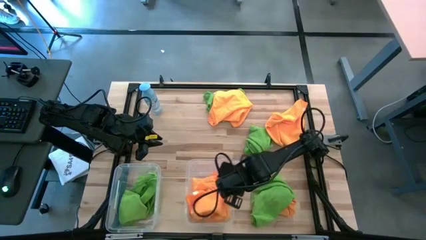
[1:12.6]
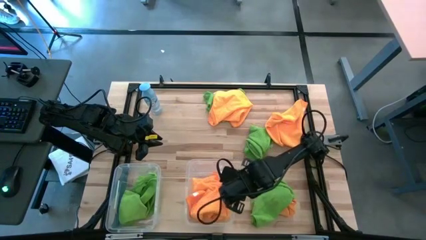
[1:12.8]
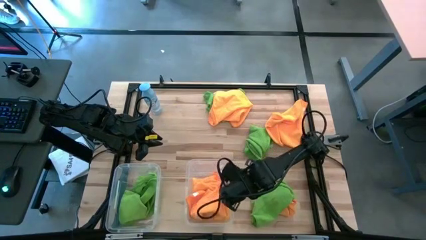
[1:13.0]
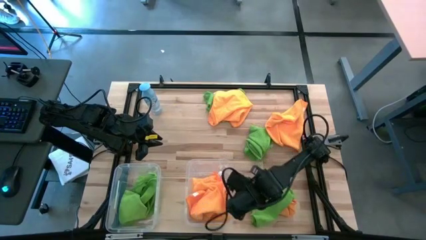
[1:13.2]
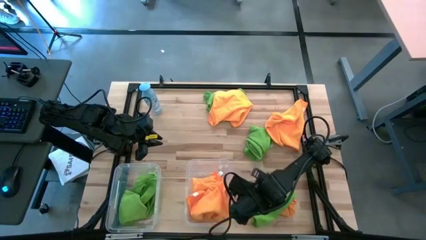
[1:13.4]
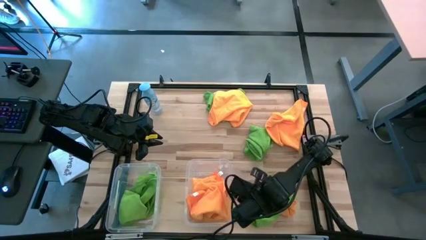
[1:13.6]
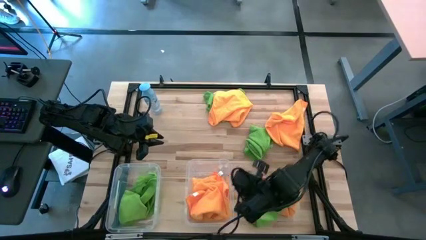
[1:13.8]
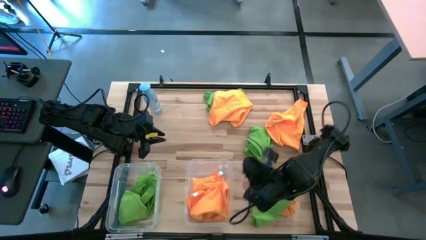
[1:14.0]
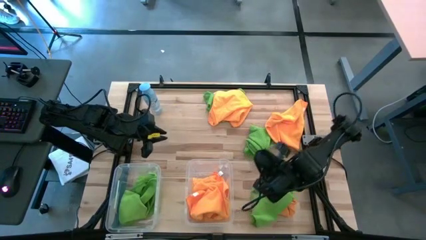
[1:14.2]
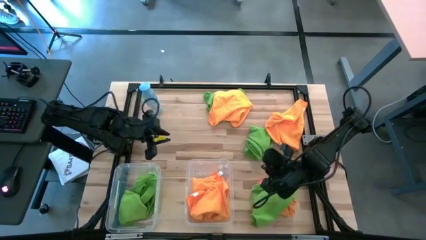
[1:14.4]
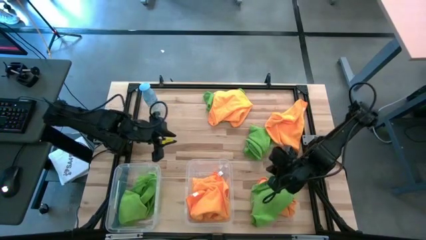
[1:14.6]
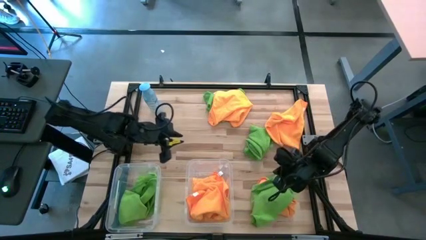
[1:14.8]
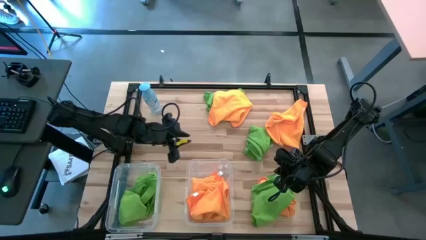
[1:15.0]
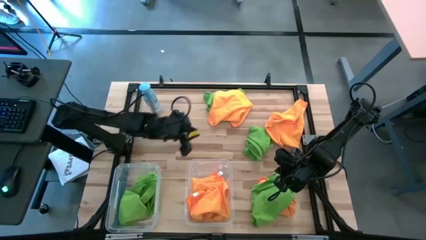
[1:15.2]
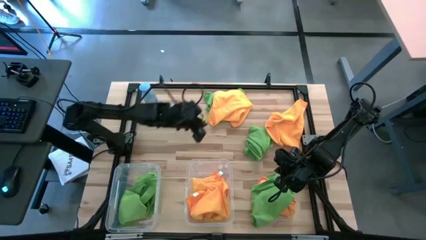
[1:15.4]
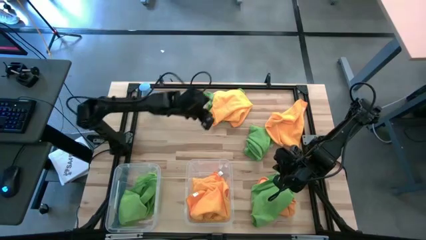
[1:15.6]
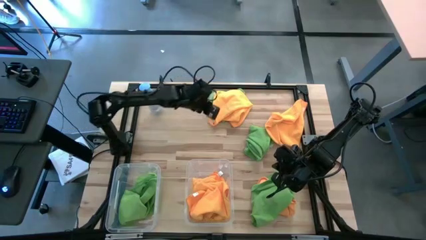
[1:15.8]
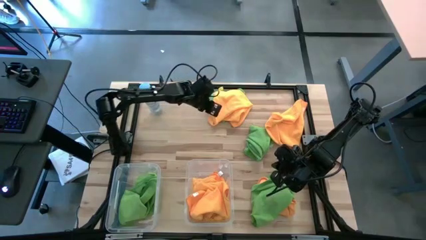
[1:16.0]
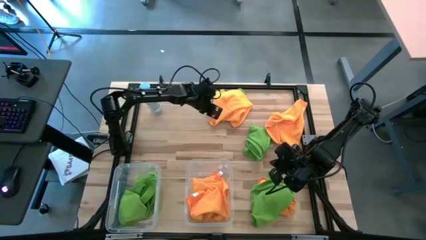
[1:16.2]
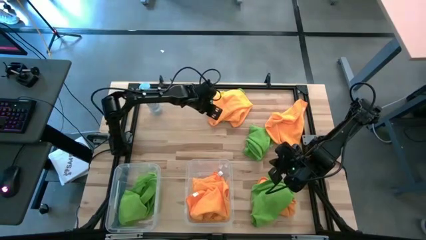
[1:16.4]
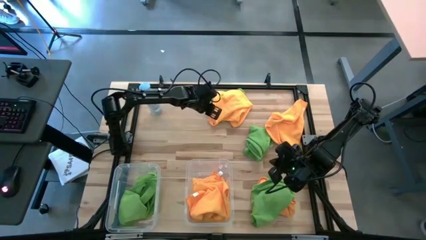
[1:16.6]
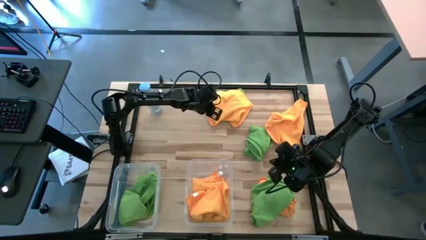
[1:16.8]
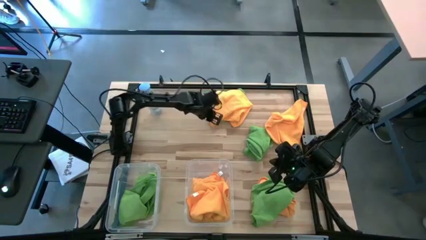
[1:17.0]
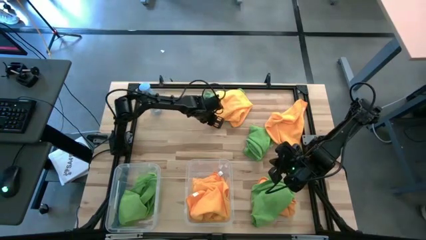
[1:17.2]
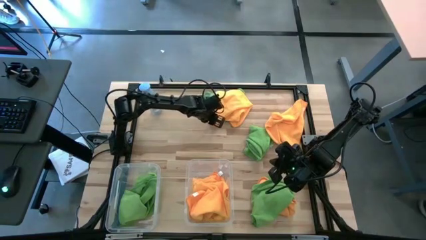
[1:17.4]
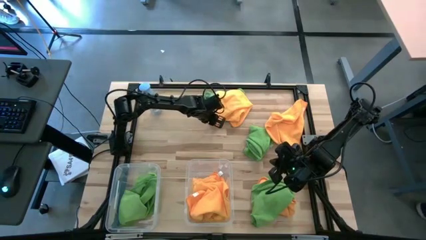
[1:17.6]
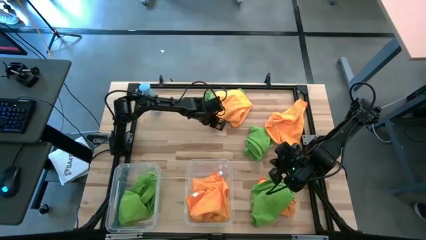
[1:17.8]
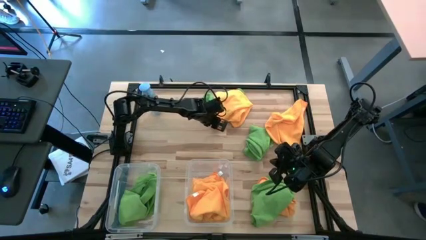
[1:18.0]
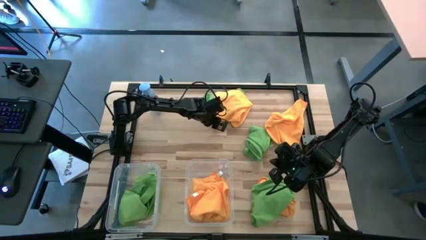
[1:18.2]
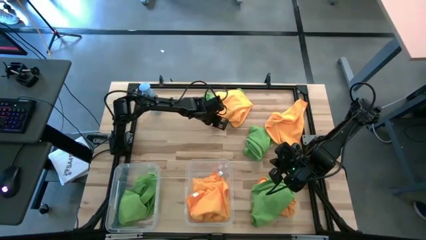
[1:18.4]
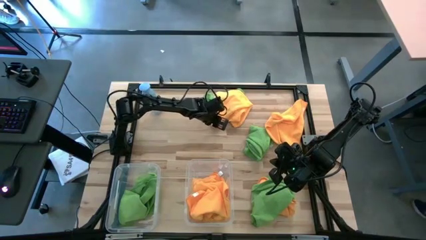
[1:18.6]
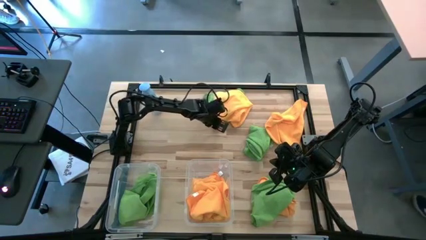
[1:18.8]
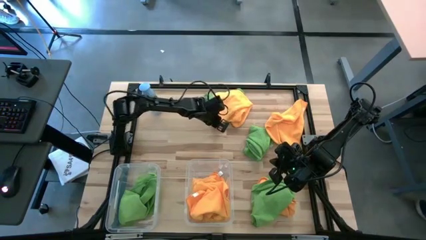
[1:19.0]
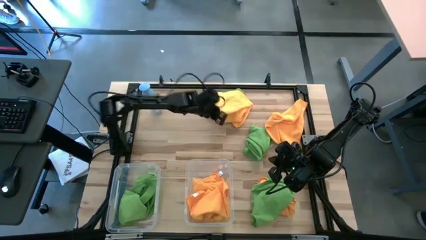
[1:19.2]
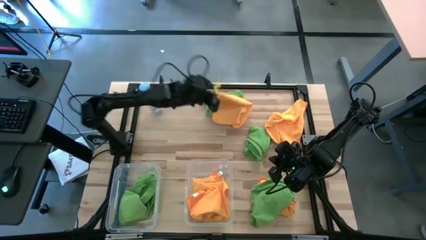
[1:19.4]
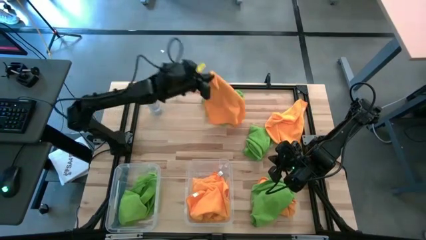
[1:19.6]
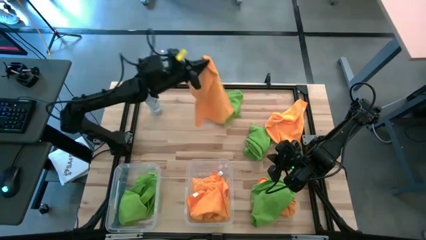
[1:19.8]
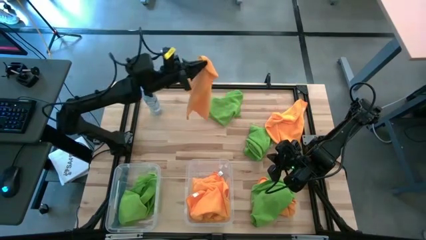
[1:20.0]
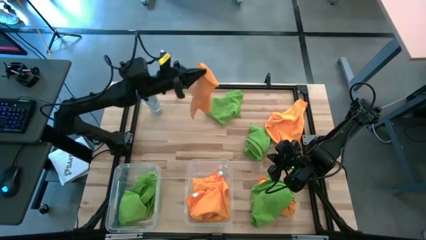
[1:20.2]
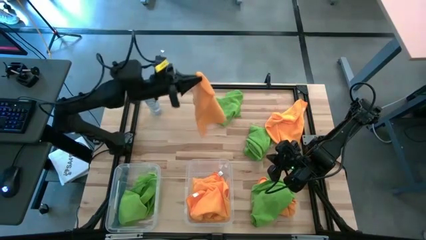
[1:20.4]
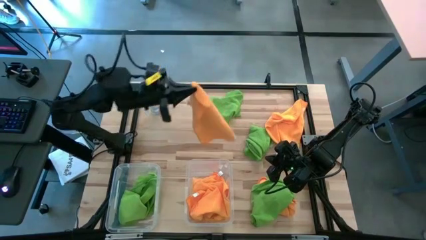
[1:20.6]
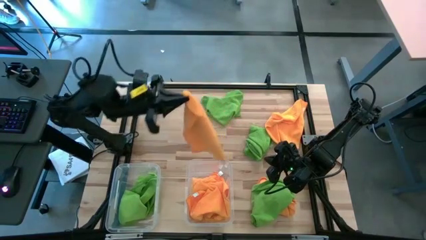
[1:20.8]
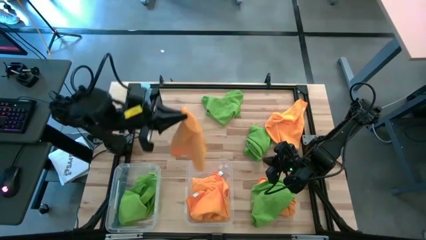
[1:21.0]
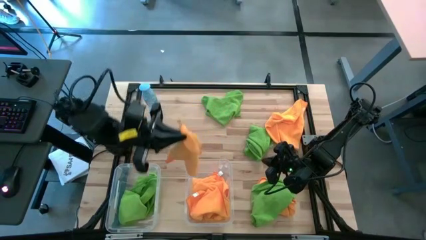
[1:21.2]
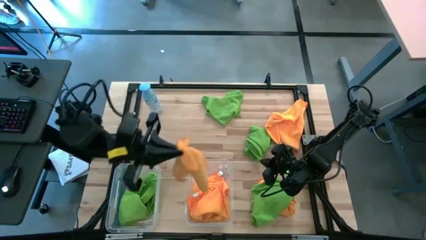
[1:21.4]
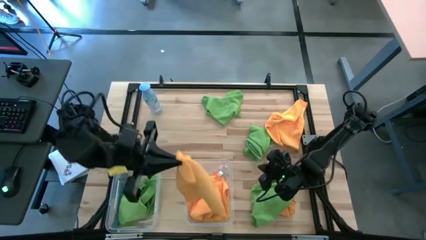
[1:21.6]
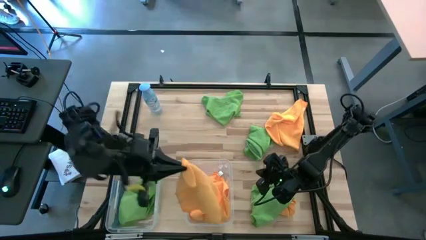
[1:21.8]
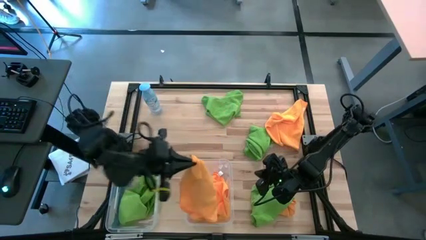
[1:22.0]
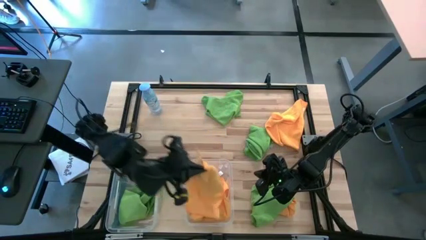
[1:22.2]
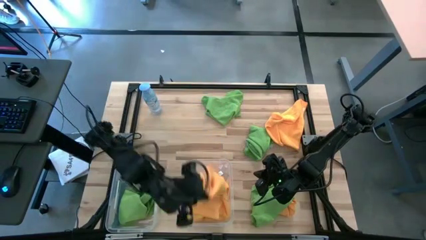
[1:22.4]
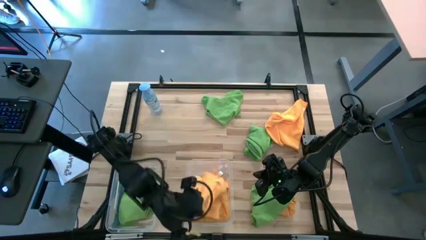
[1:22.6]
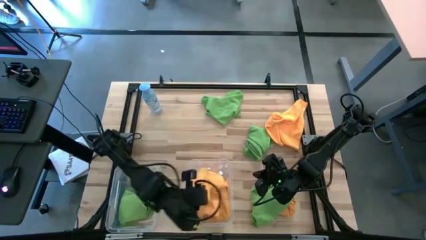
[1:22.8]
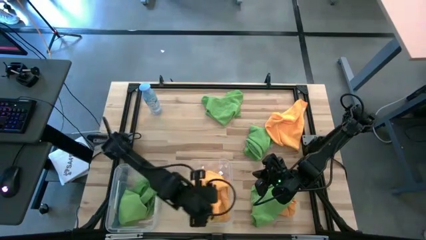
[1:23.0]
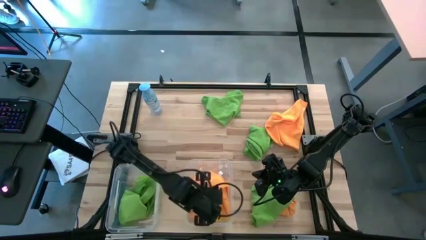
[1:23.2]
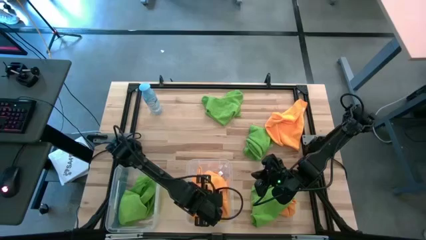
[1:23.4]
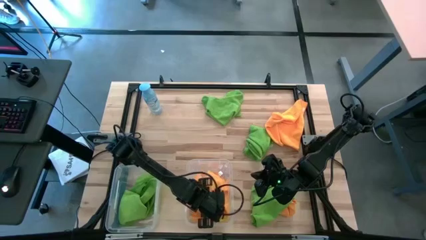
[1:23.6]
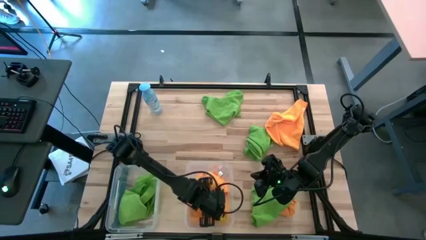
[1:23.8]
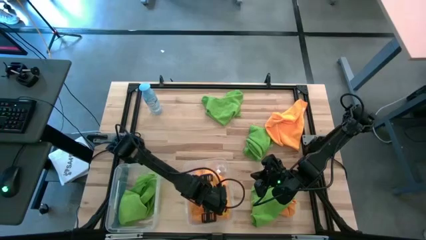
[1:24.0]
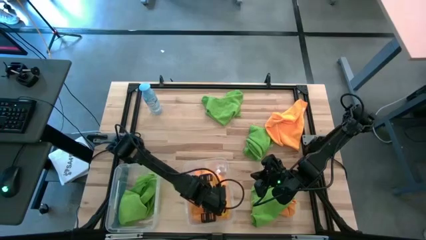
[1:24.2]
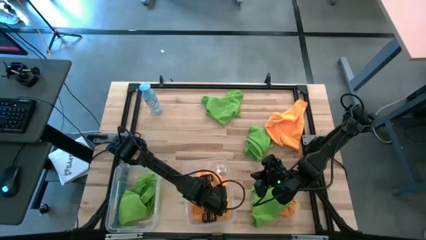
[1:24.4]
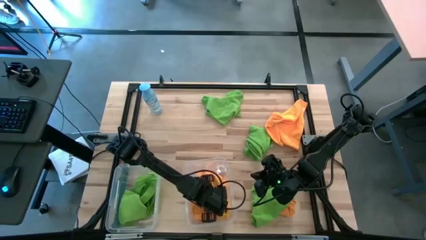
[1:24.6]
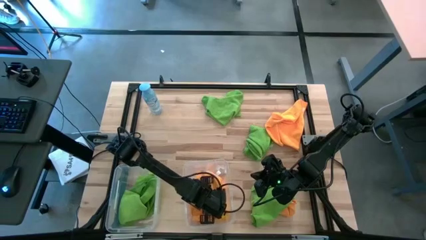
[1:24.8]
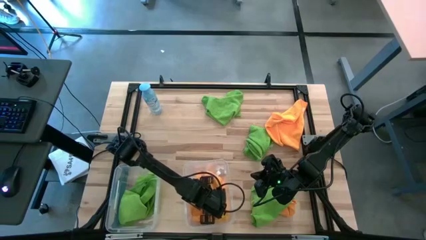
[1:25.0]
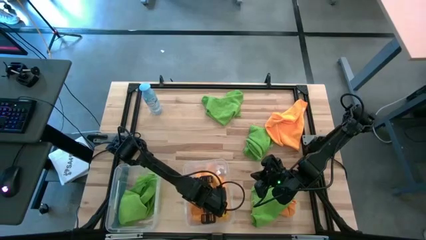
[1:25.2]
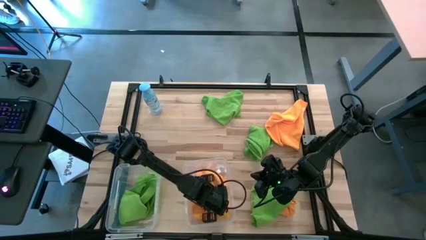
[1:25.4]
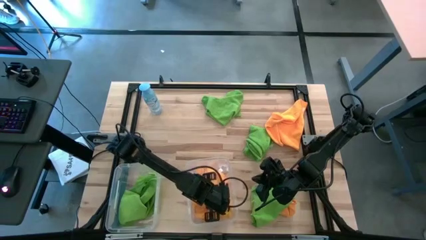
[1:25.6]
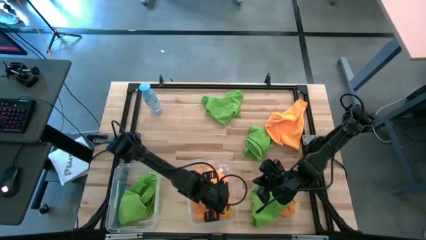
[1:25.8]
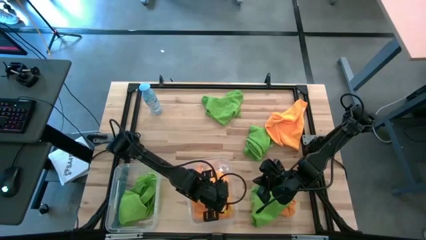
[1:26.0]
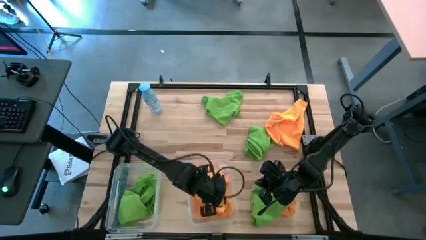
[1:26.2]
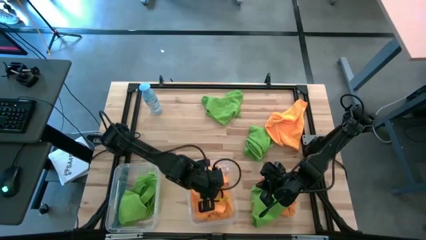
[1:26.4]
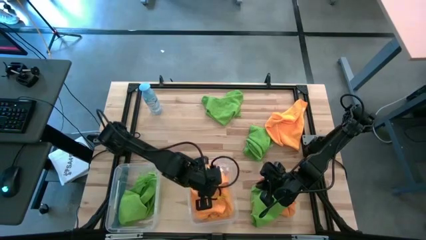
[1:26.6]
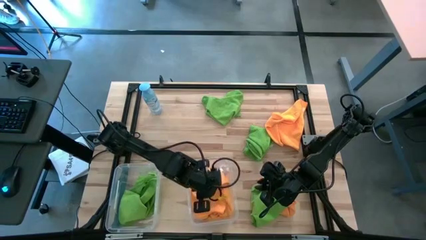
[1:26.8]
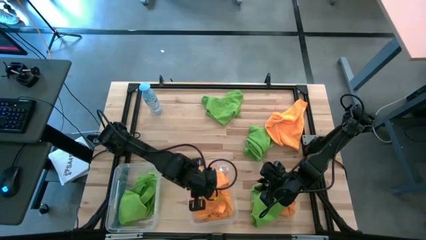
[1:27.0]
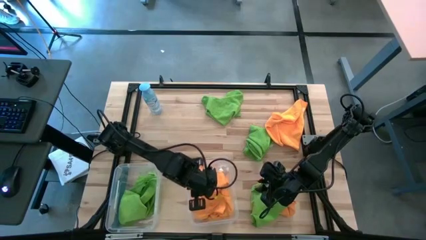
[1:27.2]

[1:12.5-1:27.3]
Task: Sort microfiber towel by color & place in baskets
Put the orange towel into the right transparent bin

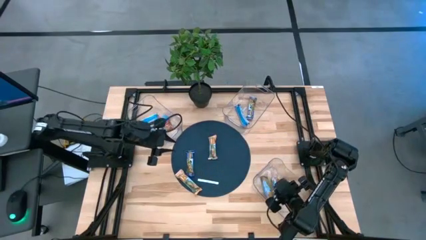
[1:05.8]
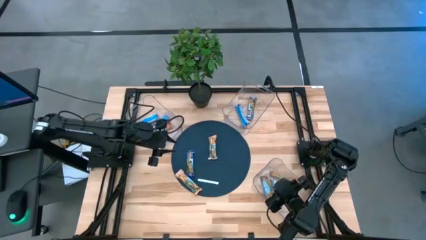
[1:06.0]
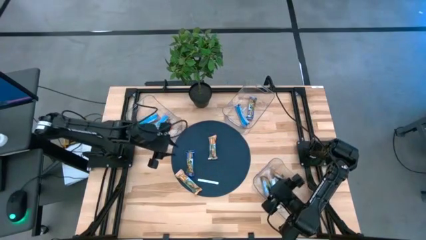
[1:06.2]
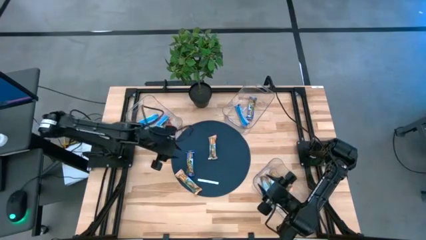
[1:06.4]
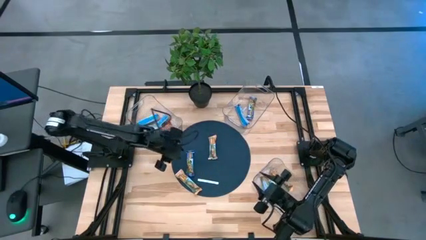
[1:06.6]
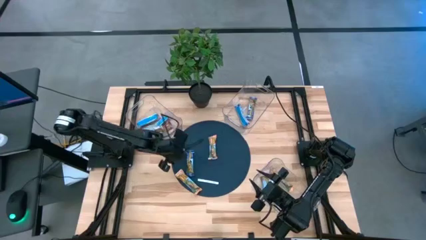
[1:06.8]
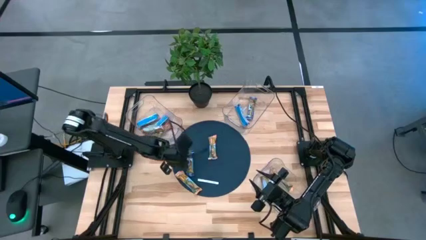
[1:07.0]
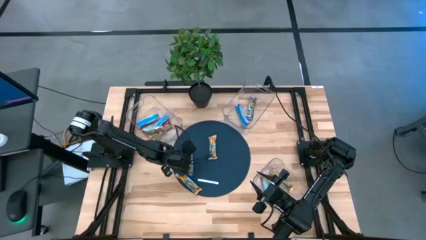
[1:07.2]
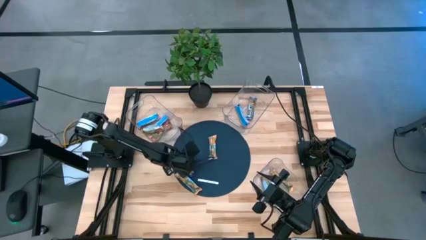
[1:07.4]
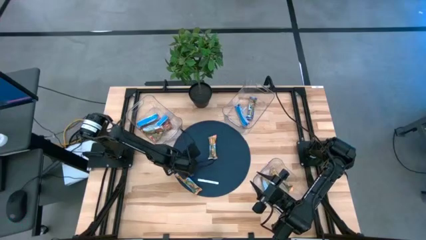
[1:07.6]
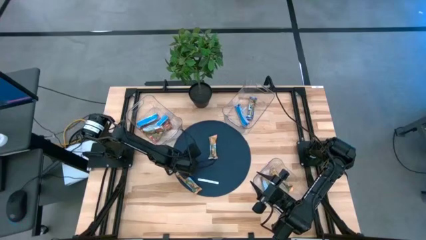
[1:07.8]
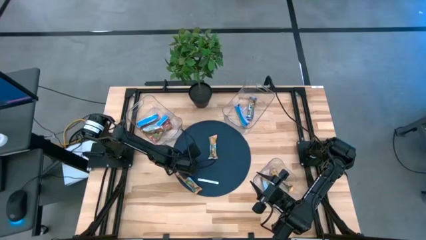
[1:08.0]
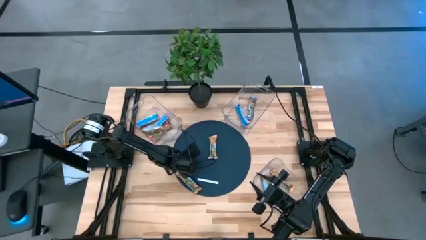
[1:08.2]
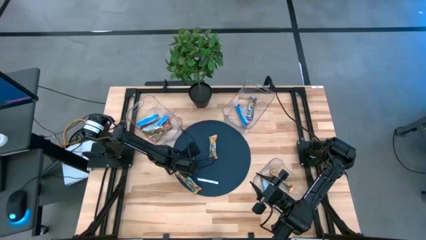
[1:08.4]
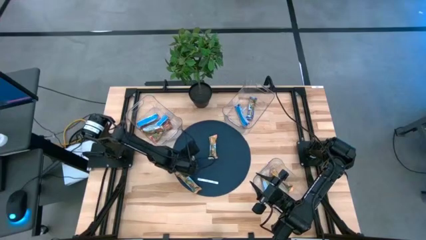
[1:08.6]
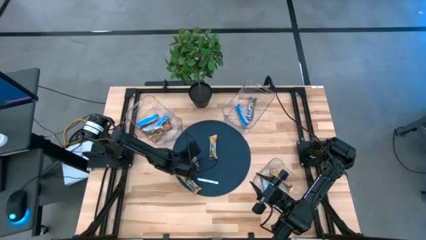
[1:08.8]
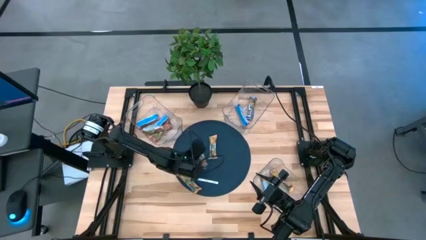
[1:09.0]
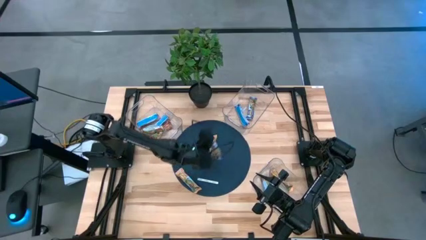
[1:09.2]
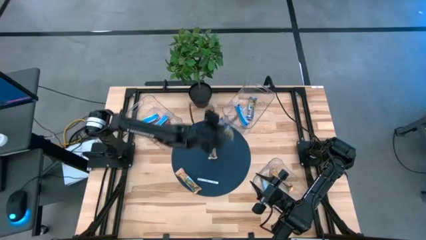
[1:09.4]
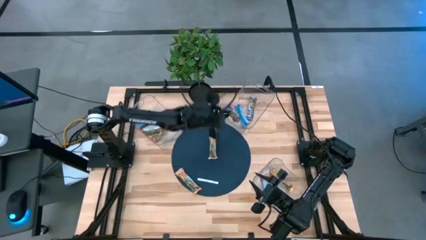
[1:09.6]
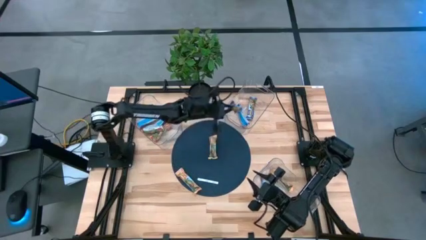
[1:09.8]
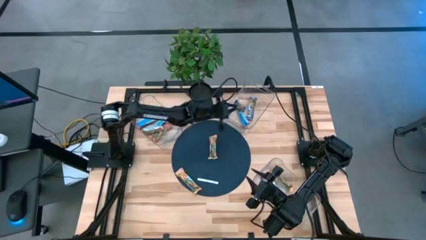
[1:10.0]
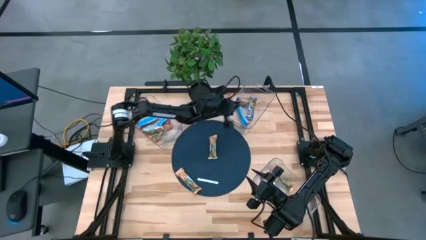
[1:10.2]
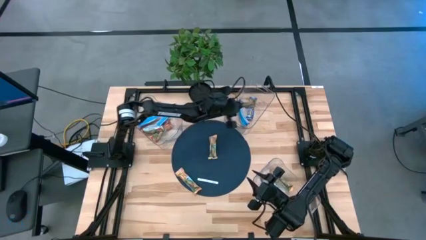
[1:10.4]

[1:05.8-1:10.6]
Task: Pick and place Granola Bars by type
Put the blue granola bar into the top right transparent bin
